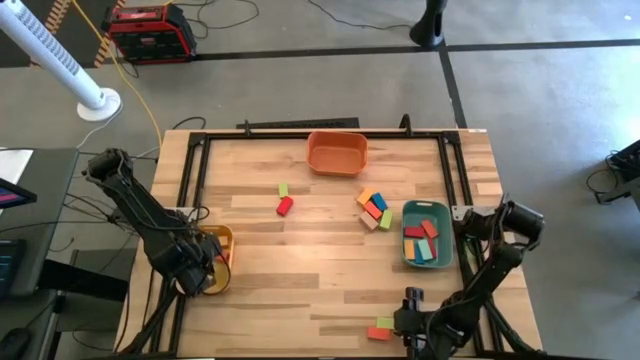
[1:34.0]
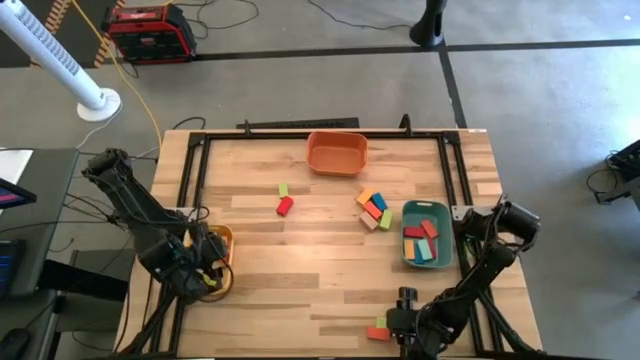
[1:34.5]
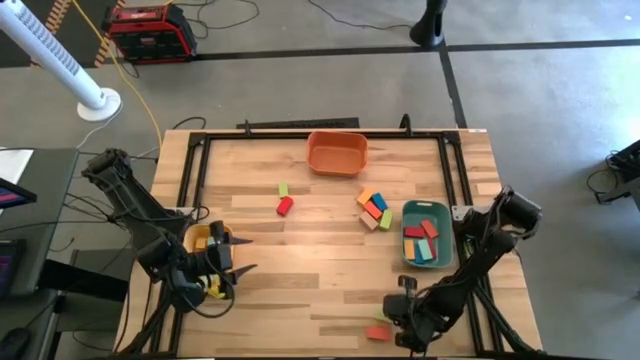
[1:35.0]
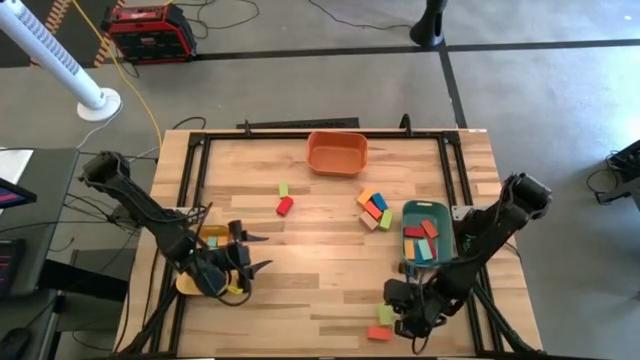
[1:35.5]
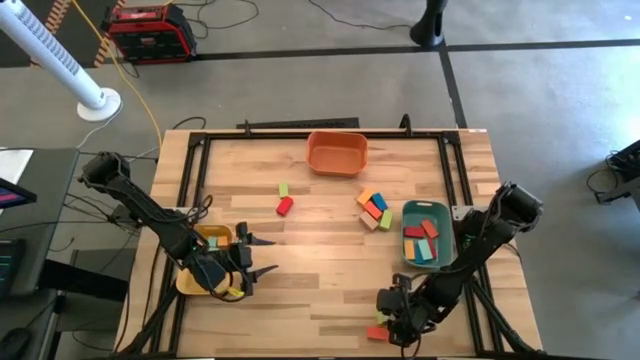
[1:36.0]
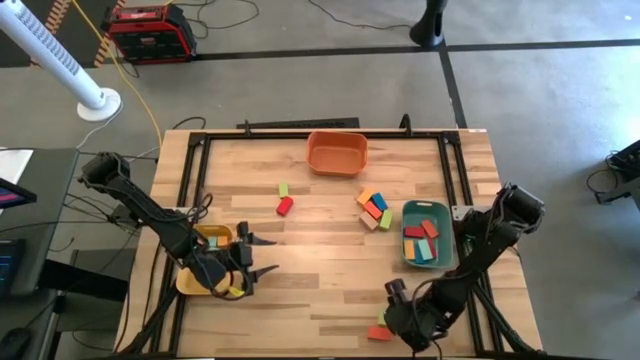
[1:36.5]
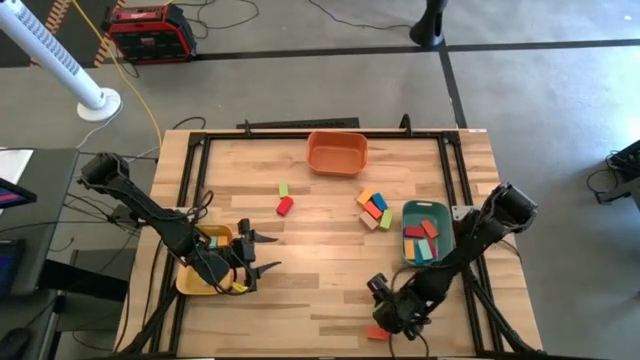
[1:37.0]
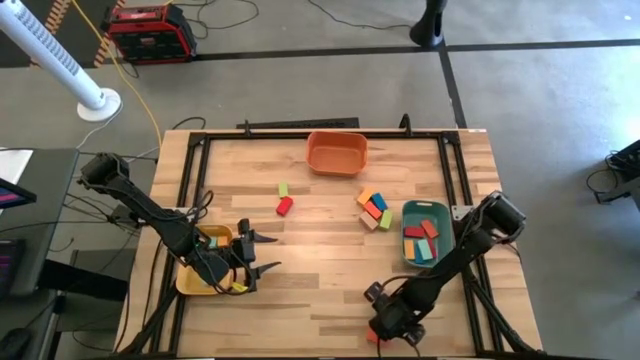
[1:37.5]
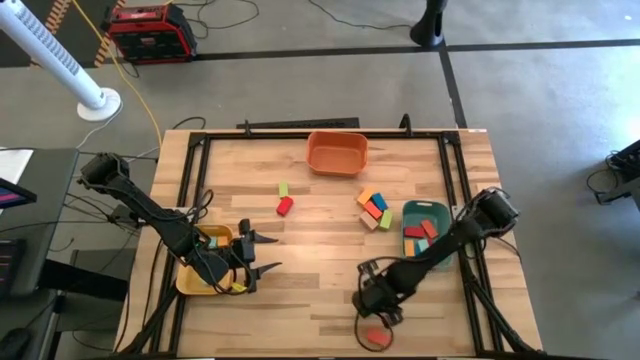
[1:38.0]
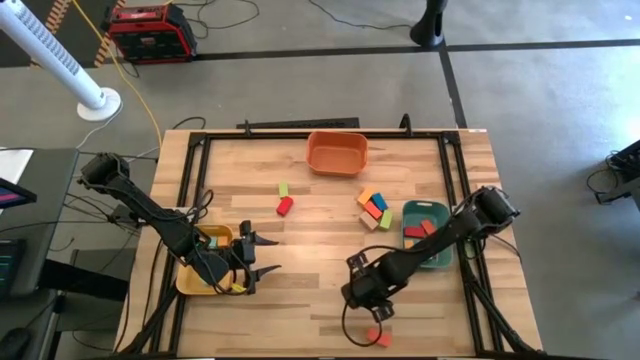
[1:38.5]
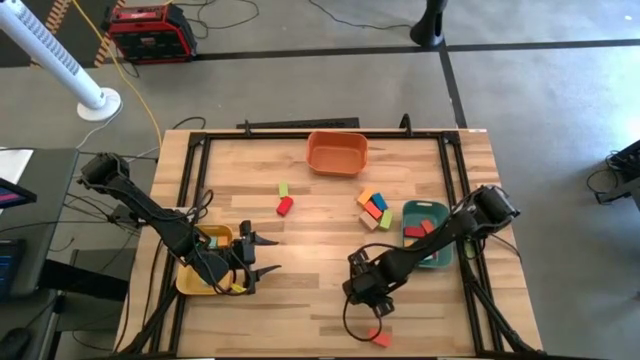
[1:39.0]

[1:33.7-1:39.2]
Task: Sort blocks by size
Put the medium light green block into the green bin

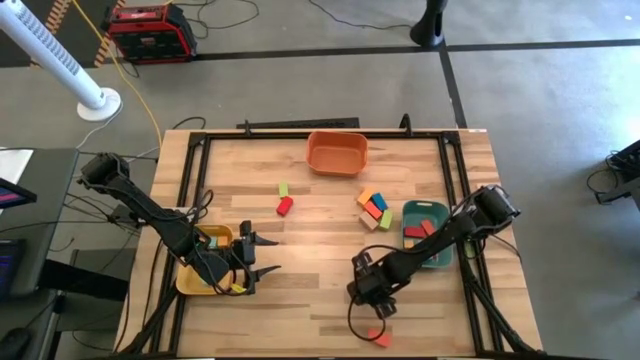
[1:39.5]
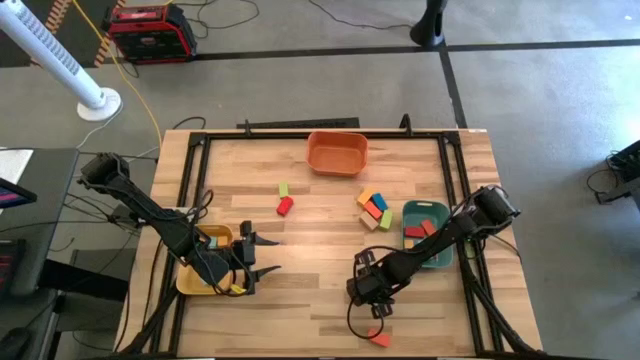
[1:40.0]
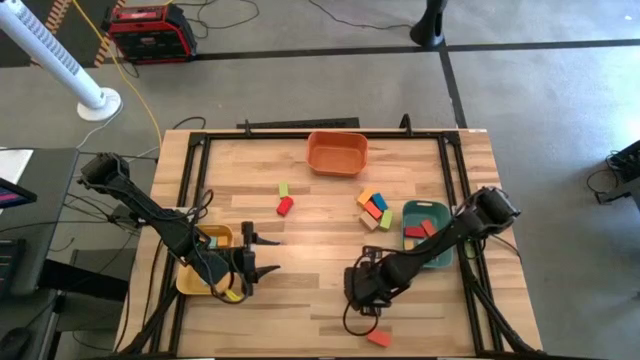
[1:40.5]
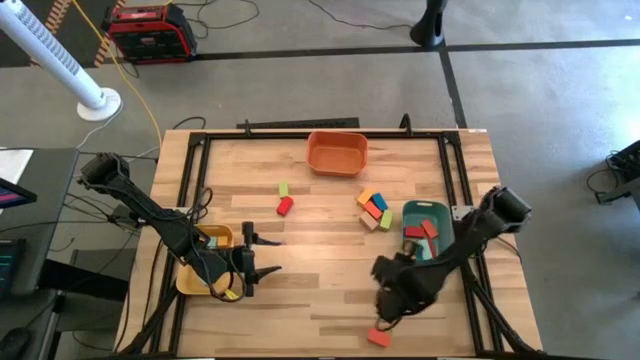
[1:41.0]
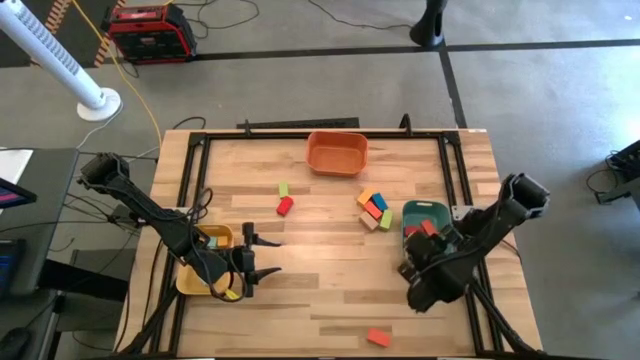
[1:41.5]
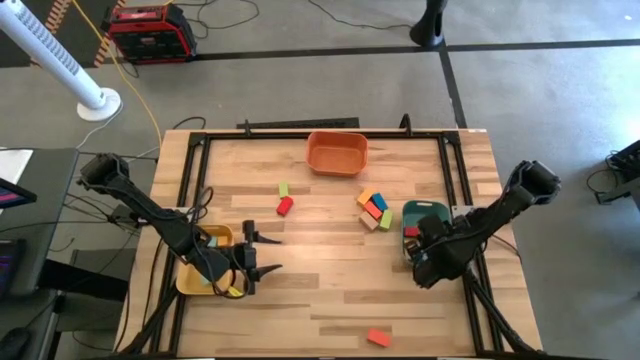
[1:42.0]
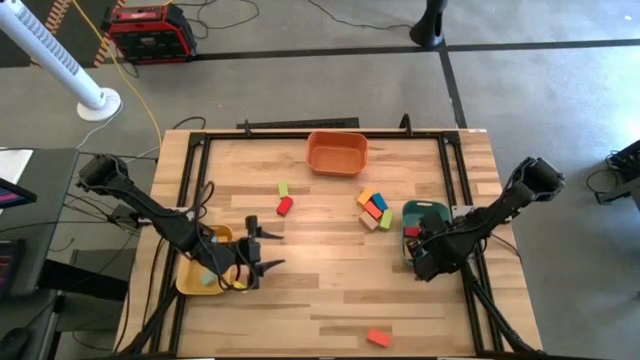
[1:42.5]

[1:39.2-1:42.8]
Put the medium light green block into the green bin

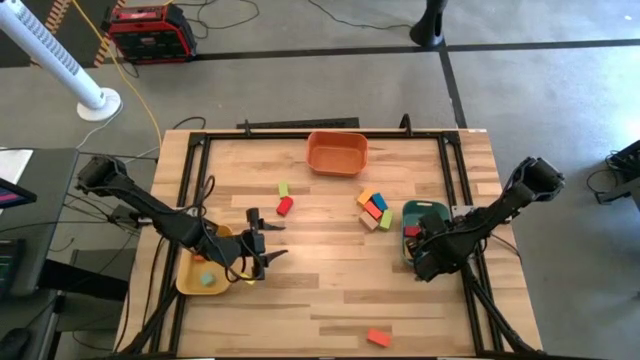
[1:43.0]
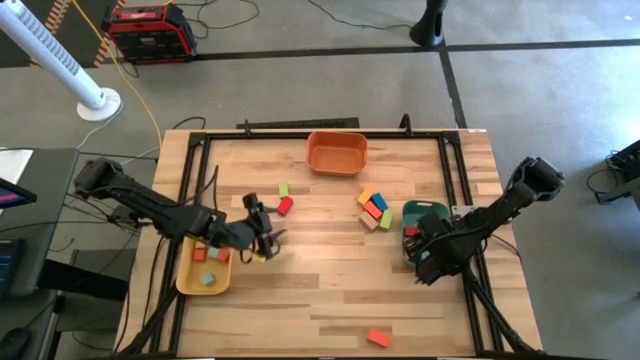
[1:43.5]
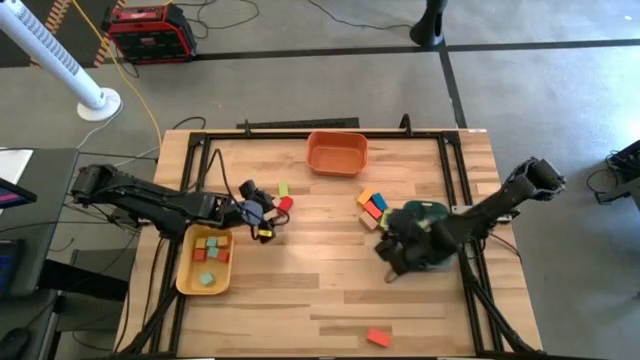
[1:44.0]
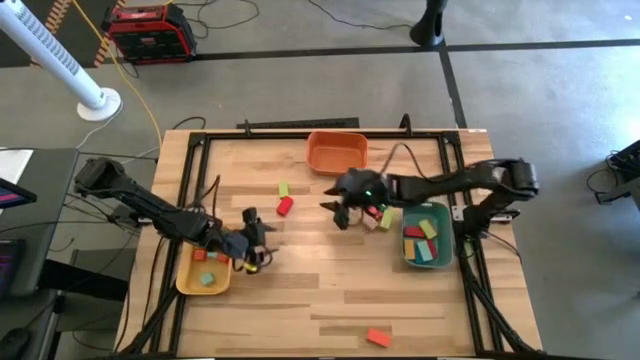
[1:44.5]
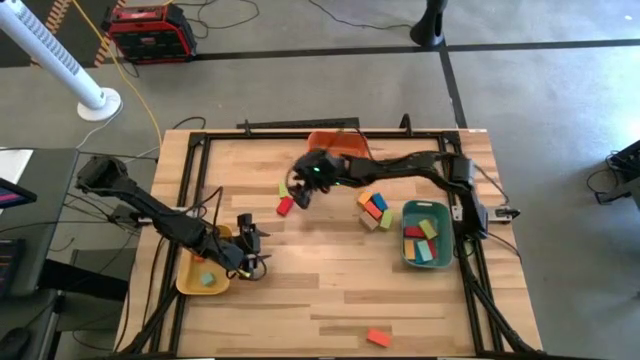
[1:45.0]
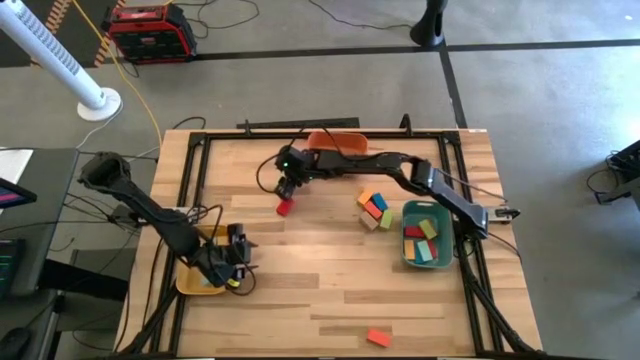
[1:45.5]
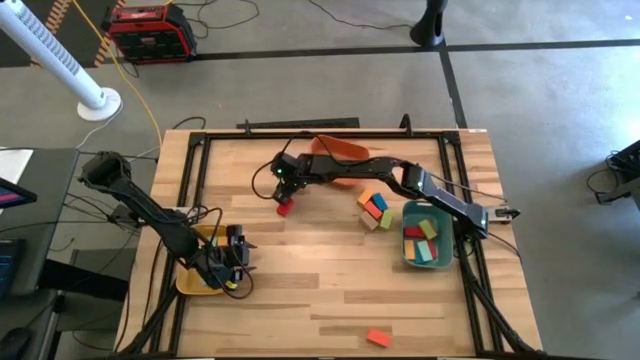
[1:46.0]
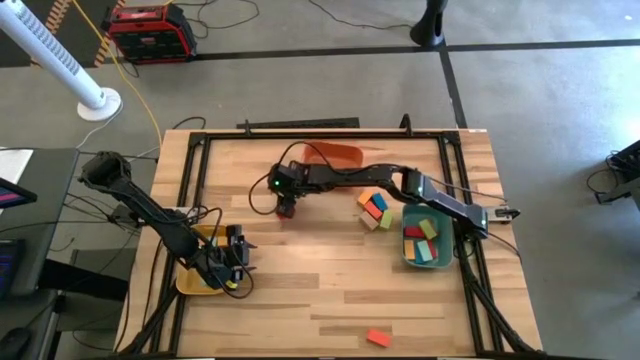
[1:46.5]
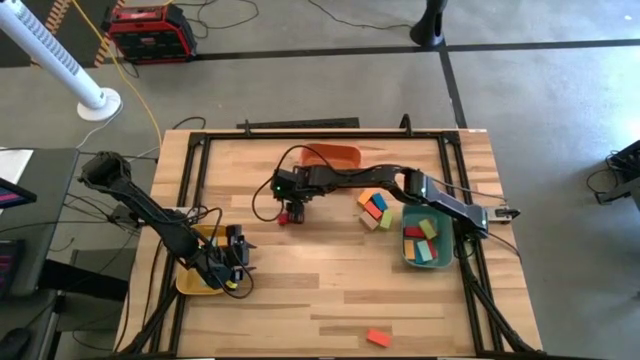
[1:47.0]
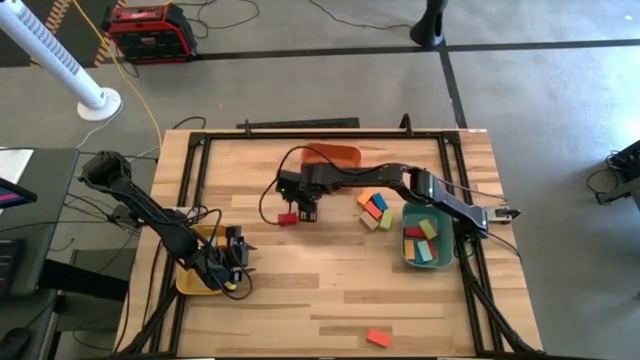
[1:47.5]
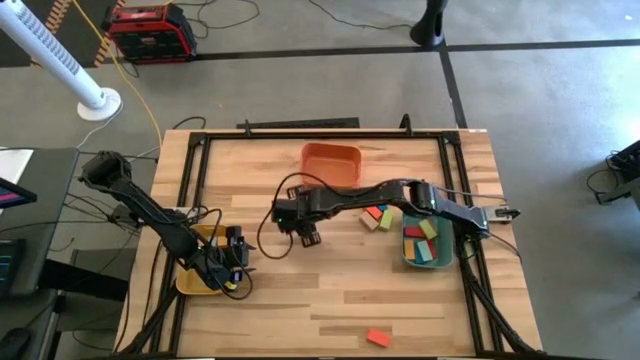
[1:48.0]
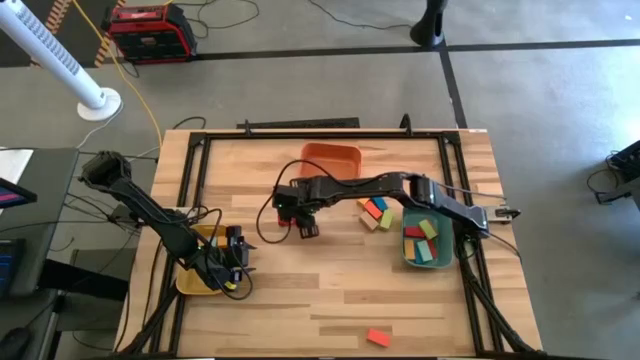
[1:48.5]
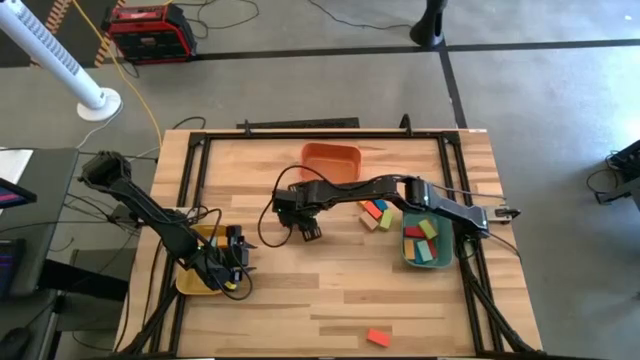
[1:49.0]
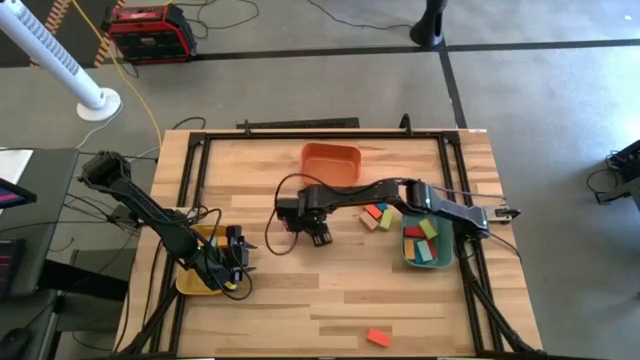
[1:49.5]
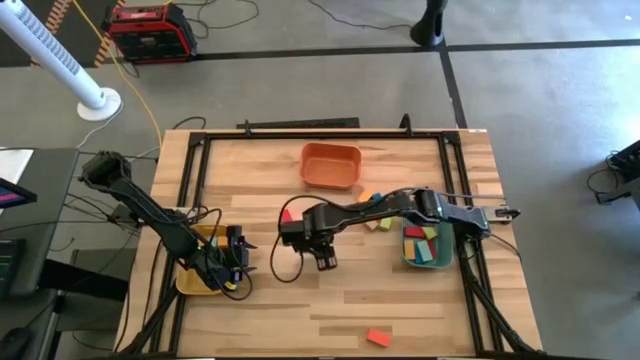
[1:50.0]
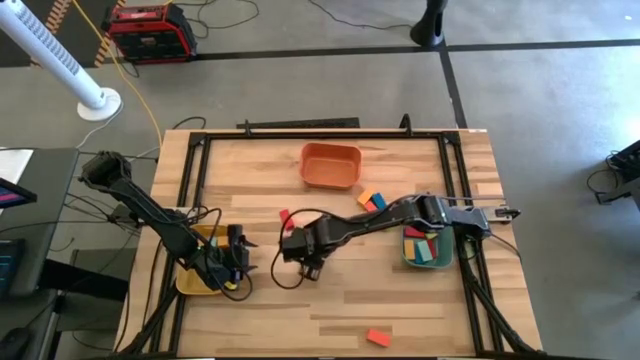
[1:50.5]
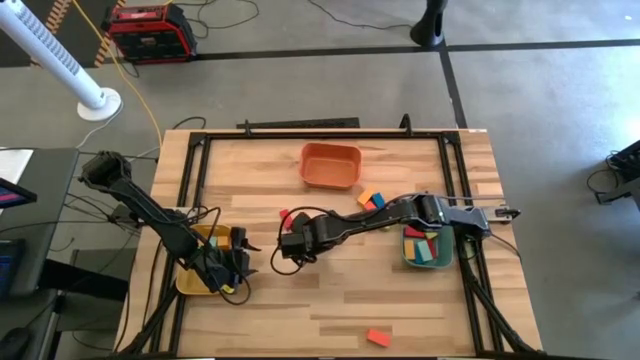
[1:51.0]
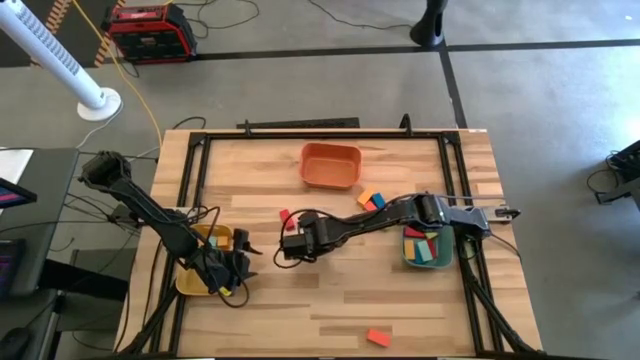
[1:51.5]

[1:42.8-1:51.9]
Put the medium light green block into the green bin

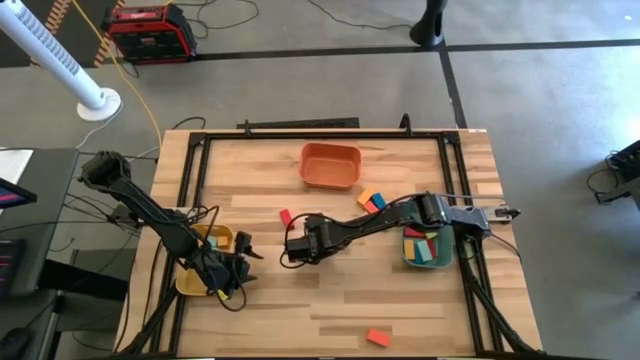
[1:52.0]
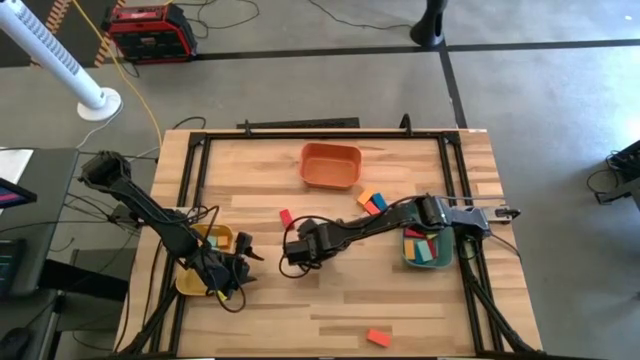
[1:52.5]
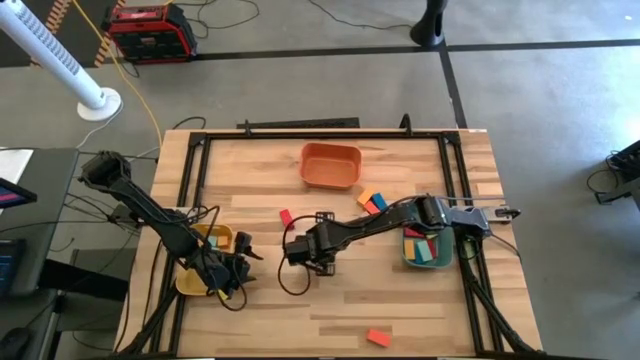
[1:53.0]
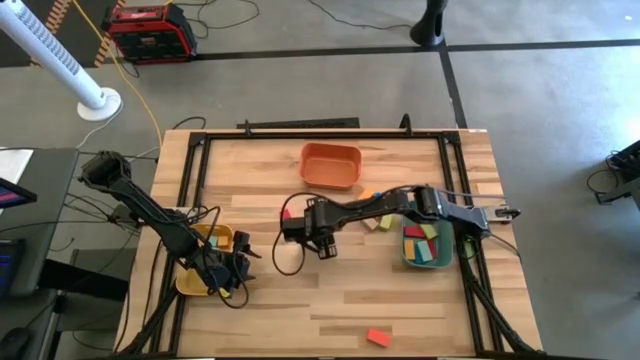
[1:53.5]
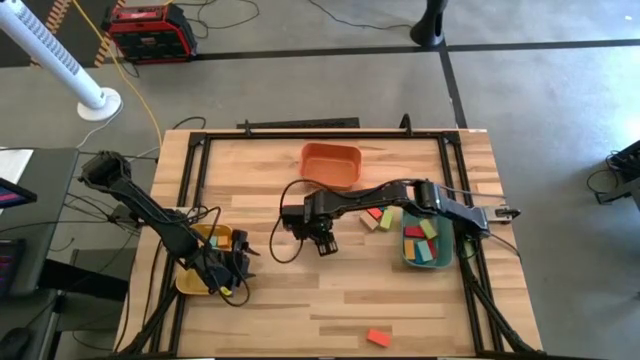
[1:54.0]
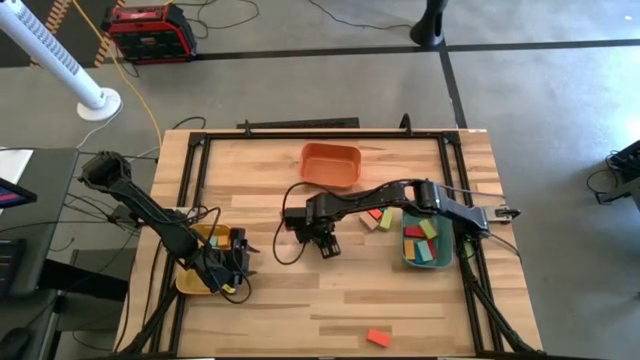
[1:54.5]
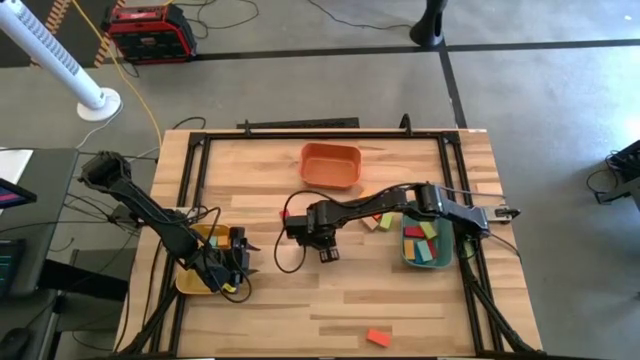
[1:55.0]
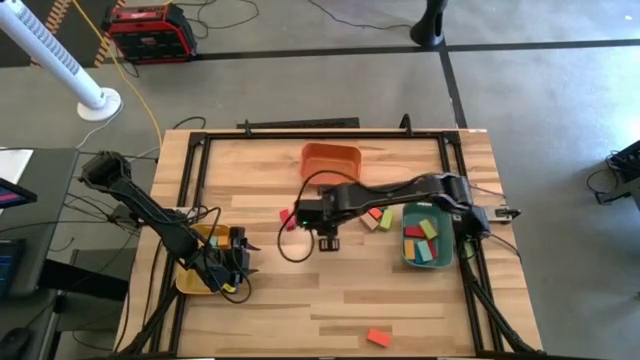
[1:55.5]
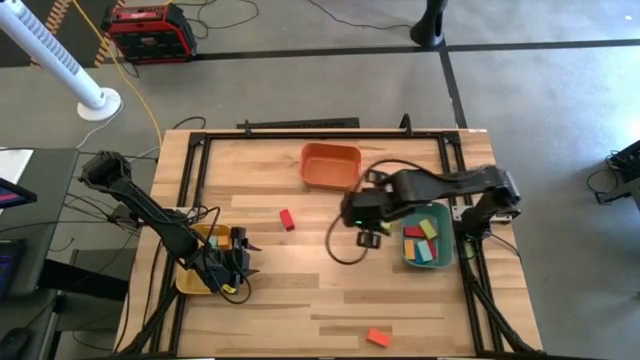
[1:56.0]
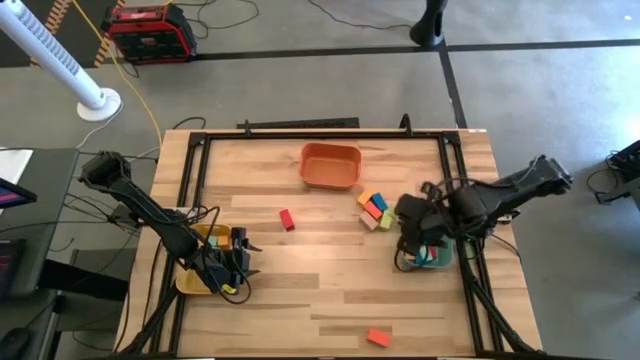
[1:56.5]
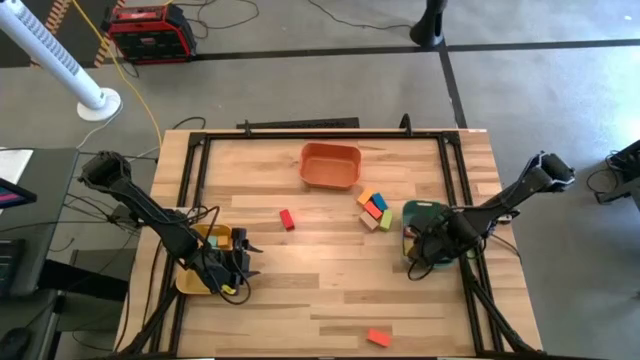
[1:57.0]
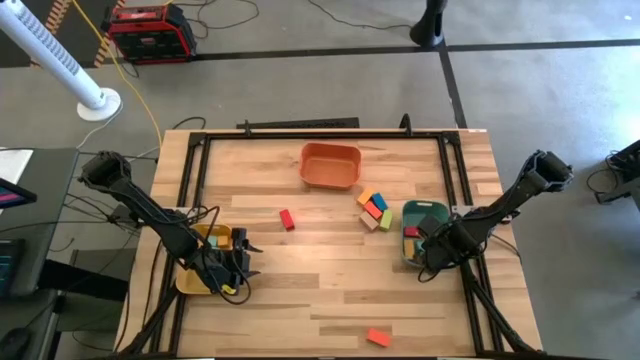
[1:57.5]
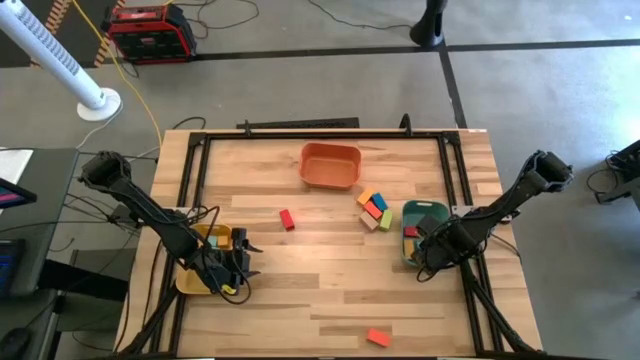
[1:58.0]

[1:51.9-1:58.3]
Put the medium light green block into the green bin
